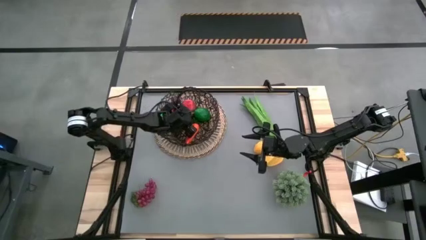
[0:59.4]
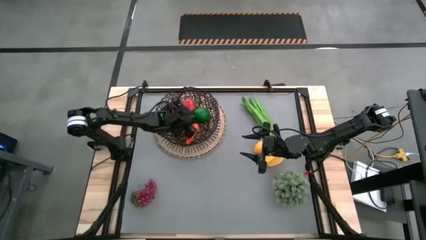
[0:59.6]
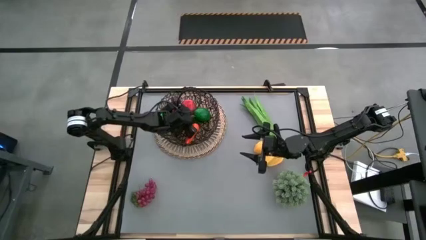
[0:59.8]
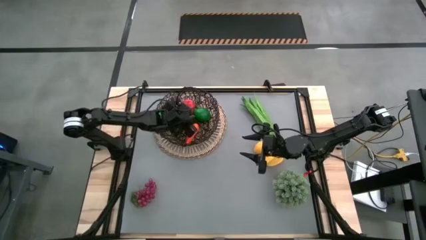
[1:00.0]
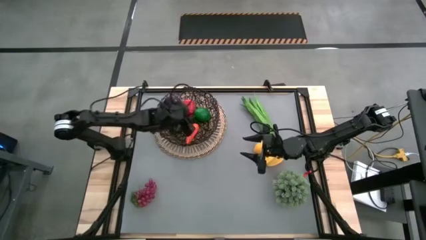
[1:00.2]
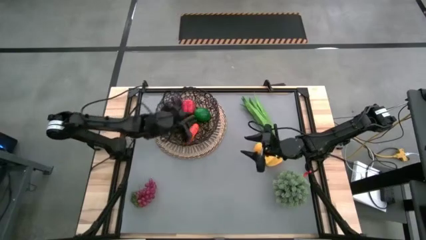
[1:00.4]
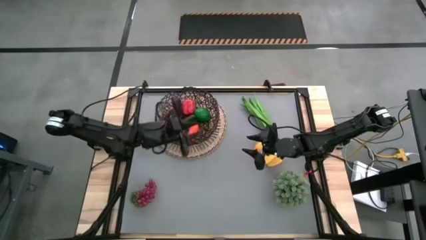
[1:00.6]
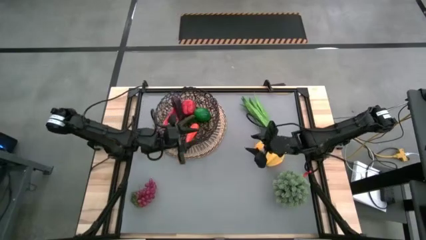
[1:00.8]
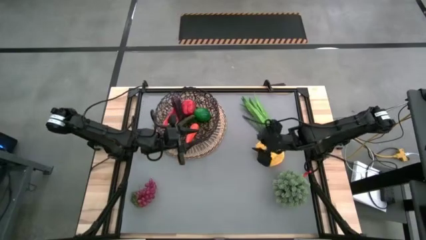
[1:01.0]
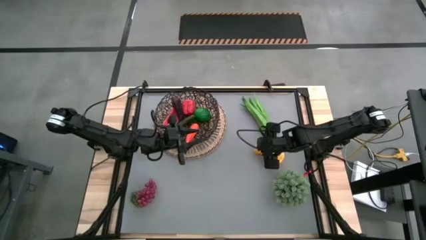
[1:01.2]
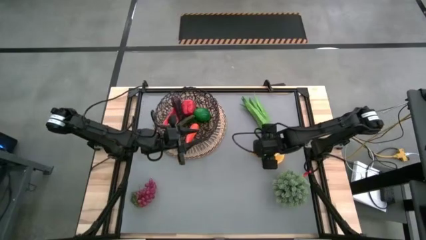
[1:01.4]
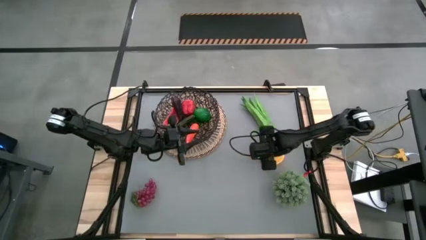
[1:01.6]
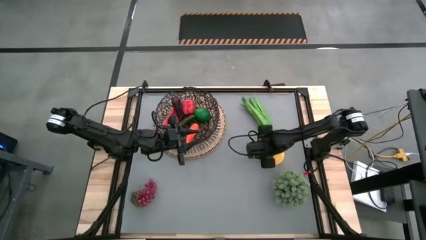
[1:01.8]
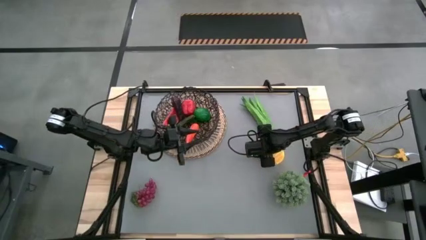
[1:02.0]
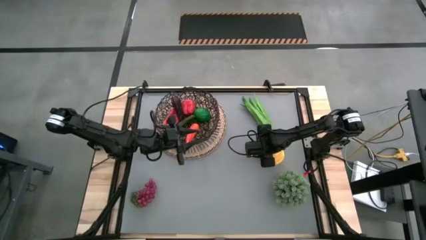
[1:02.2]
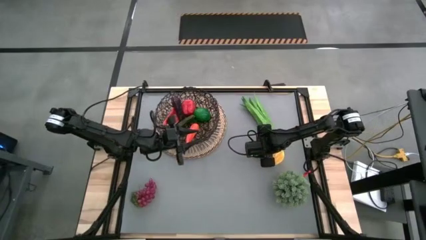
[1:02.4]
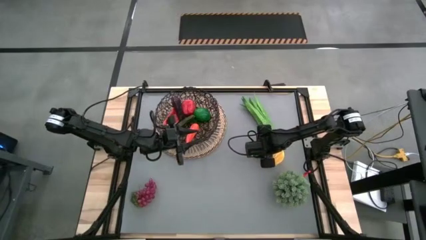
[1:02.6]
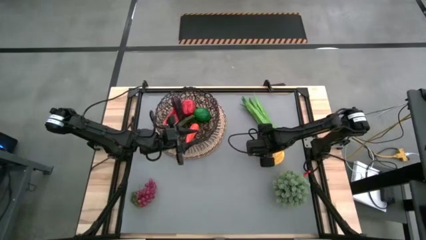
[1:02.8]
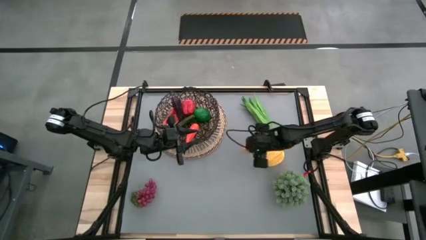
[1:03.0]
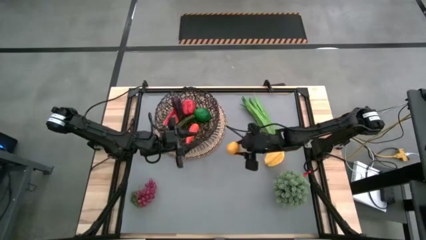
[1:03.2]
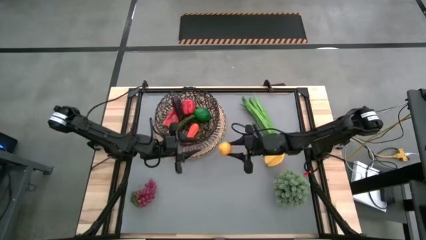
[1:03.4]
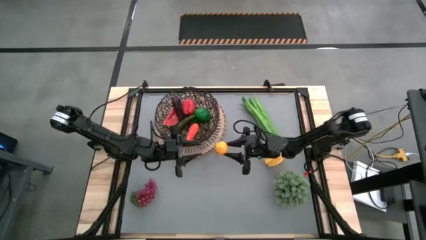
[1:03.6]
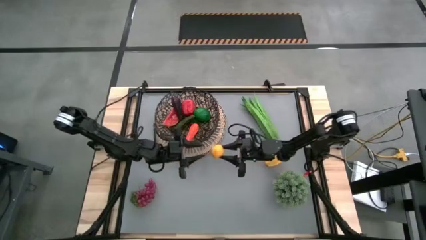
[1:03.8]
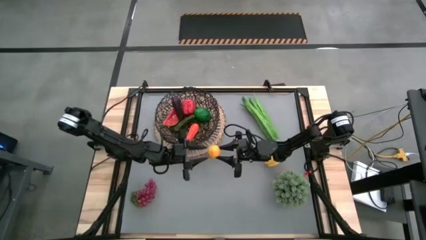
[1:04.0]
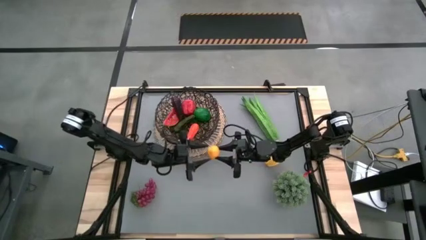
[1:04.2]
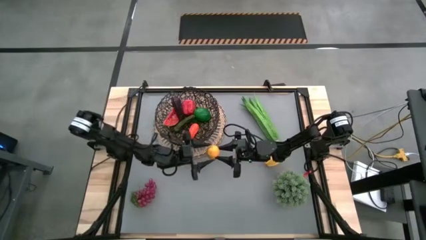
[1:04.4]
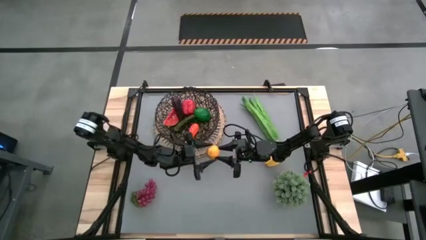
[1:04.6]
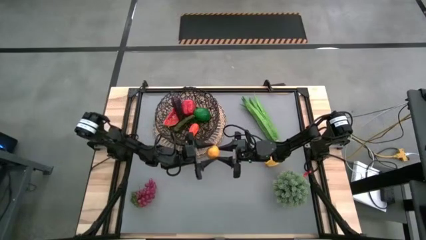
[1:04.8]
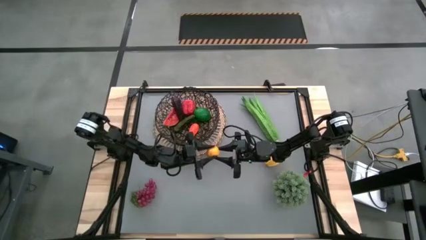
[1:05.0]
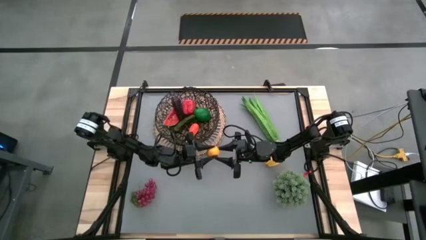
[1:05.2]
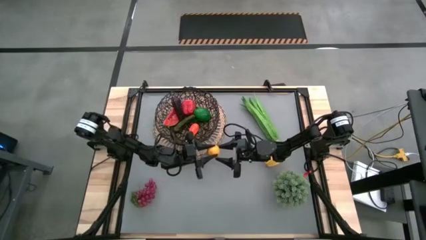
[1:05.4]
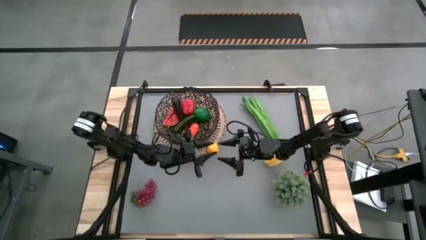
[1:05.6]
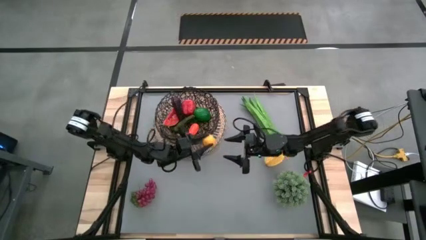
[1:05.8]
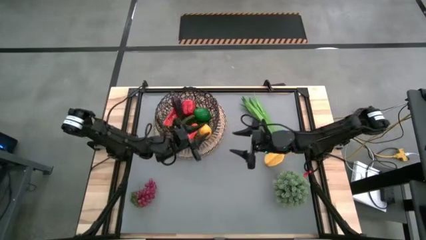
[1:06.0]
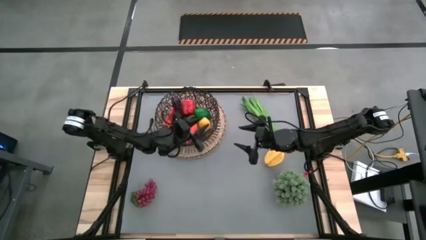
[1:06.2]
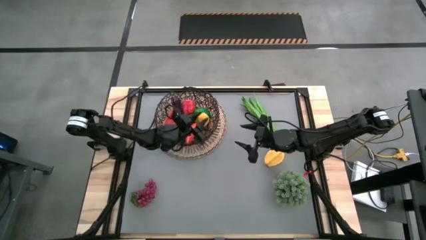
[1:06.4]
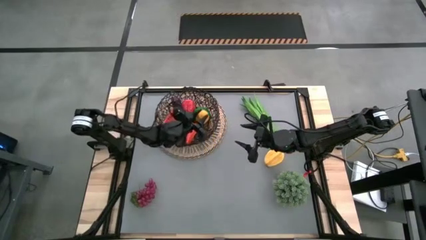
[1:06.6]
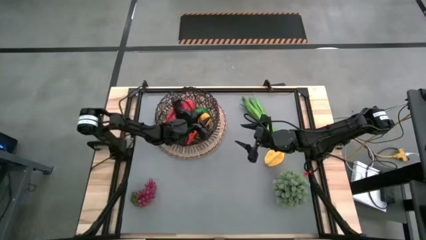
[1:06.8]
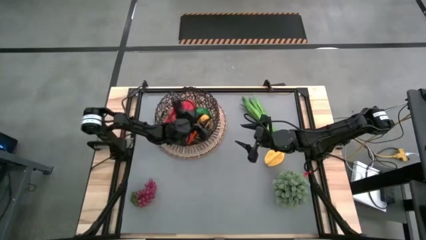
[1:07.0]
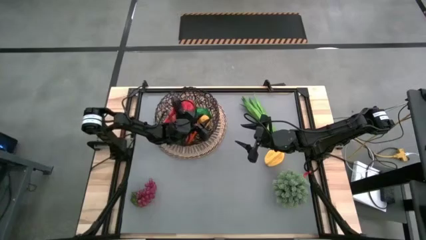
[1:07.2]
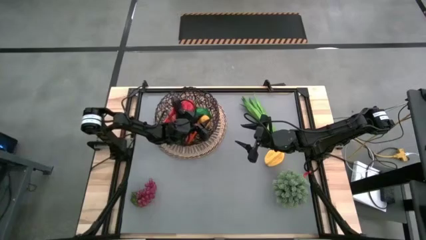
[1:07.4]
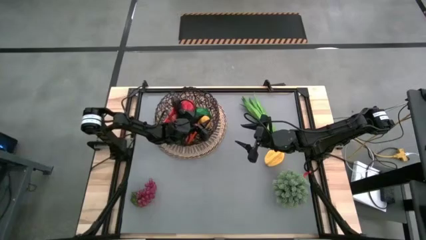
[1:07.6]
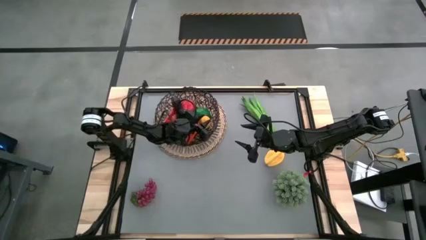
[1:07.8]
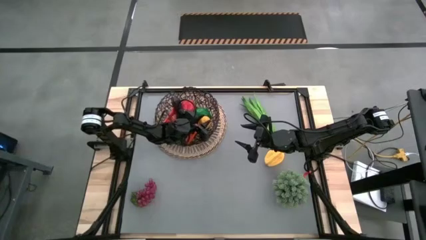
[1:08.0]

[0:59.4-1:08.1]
Task: Build produce basket
Put the yellow lemon into the black wire basket

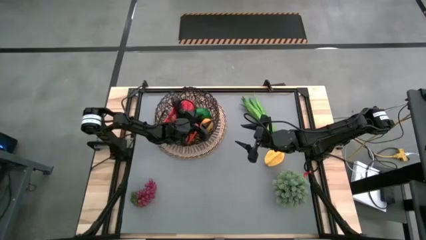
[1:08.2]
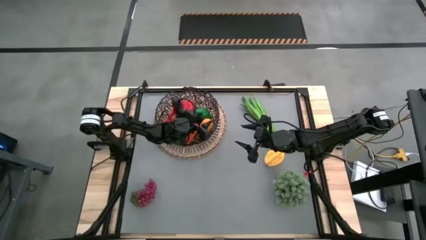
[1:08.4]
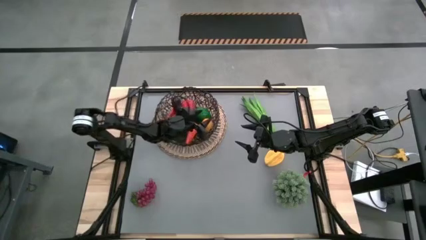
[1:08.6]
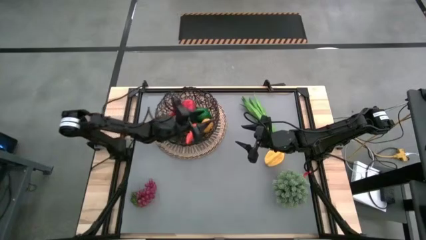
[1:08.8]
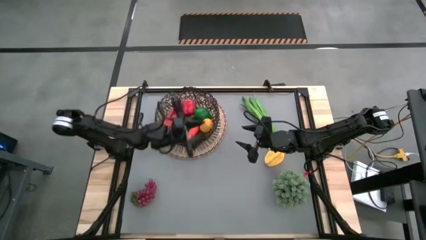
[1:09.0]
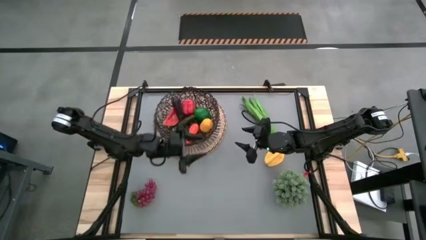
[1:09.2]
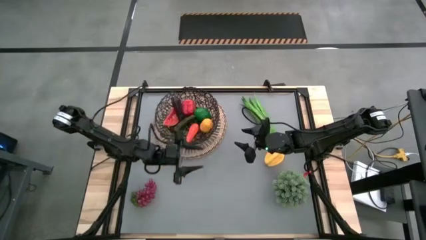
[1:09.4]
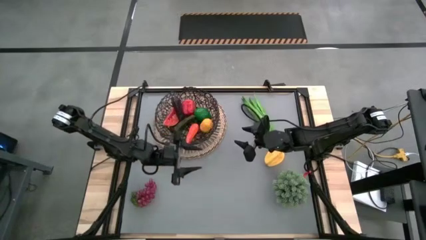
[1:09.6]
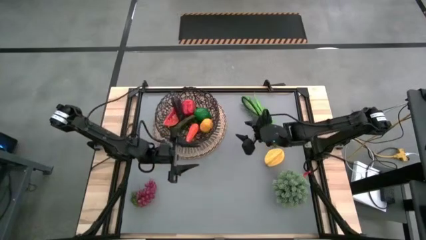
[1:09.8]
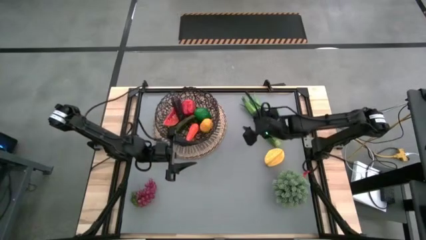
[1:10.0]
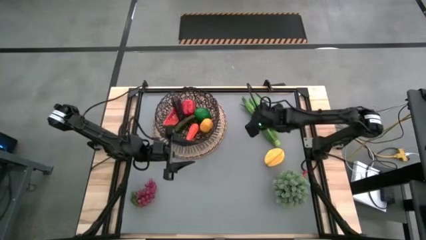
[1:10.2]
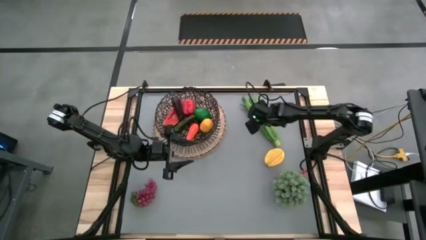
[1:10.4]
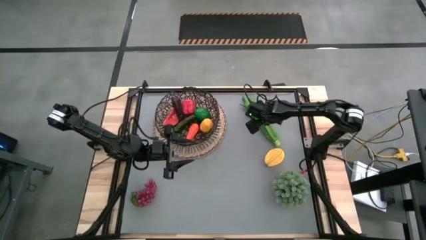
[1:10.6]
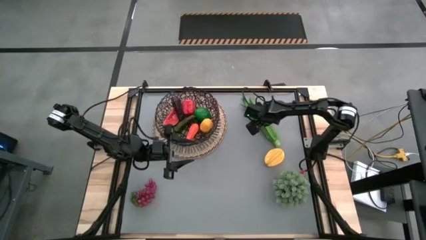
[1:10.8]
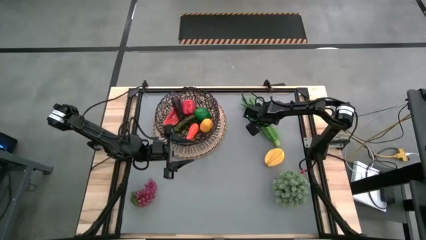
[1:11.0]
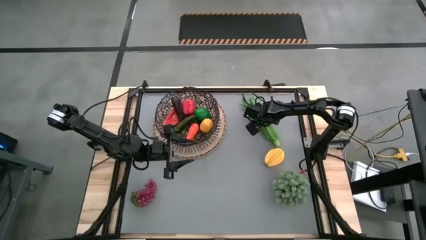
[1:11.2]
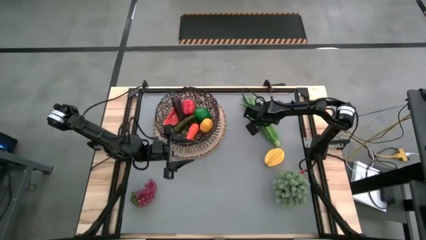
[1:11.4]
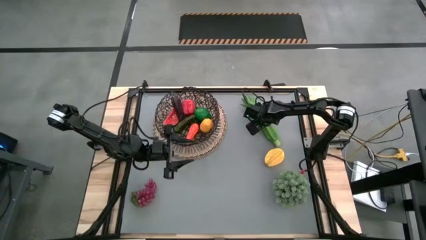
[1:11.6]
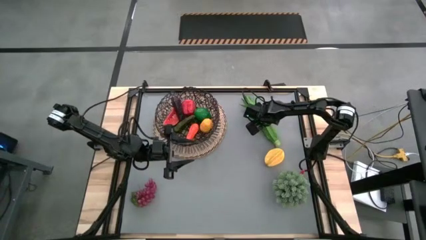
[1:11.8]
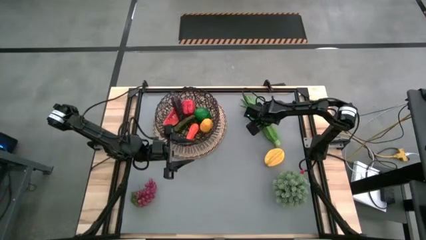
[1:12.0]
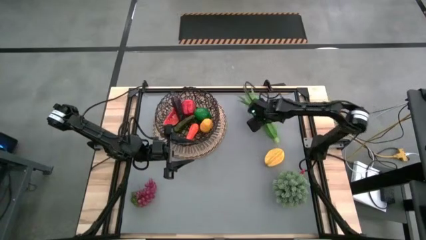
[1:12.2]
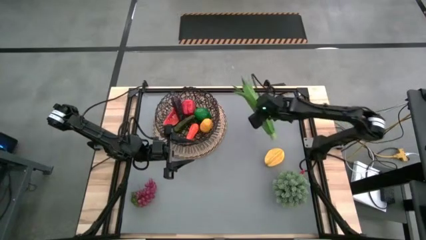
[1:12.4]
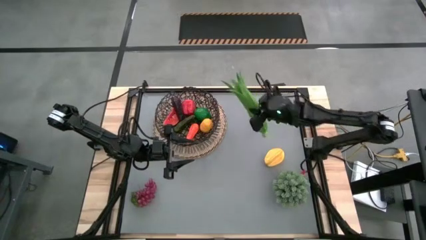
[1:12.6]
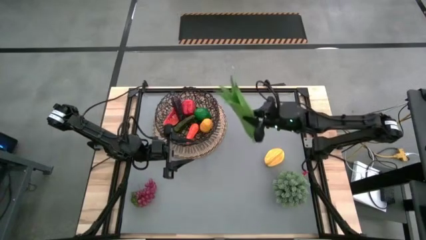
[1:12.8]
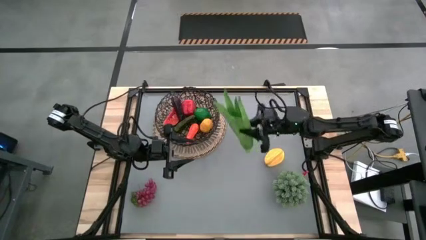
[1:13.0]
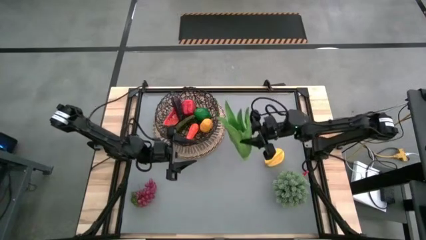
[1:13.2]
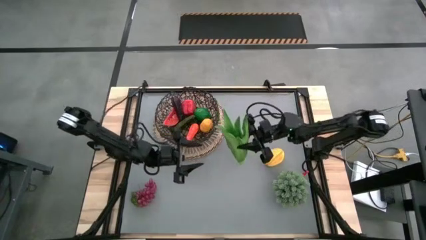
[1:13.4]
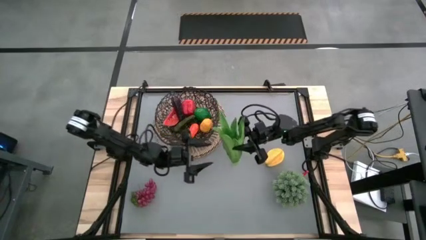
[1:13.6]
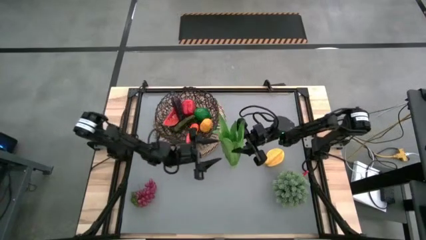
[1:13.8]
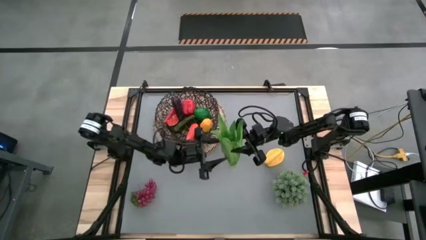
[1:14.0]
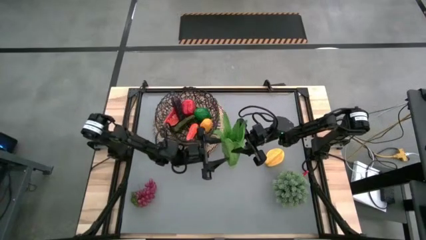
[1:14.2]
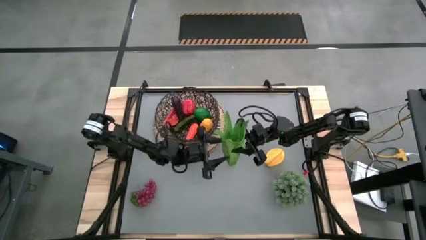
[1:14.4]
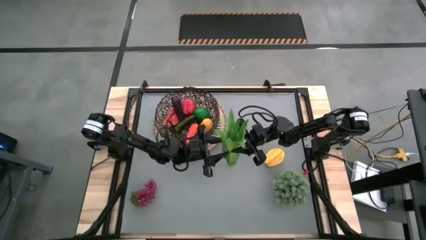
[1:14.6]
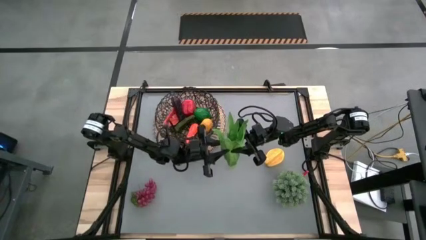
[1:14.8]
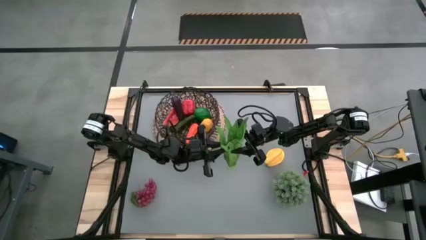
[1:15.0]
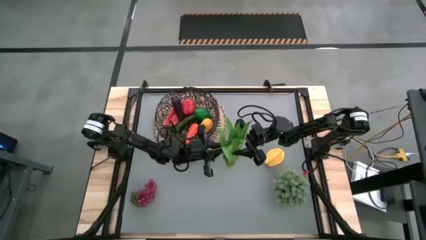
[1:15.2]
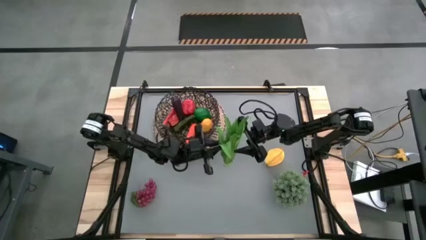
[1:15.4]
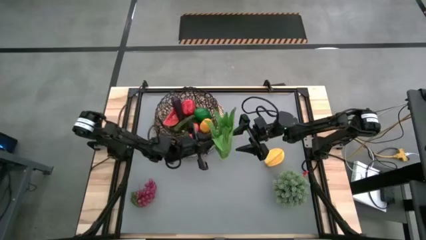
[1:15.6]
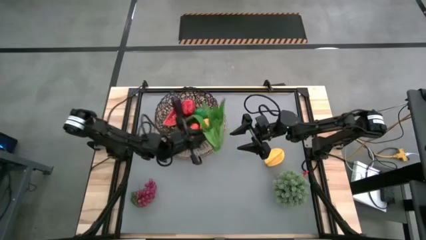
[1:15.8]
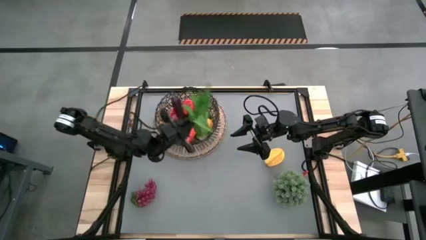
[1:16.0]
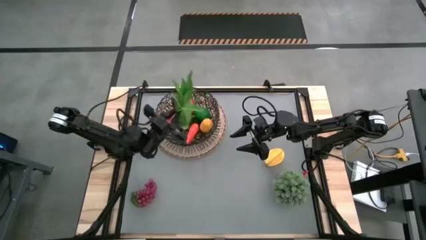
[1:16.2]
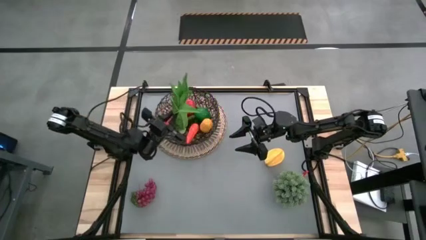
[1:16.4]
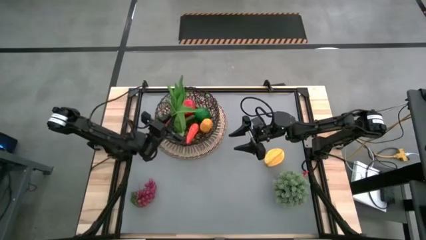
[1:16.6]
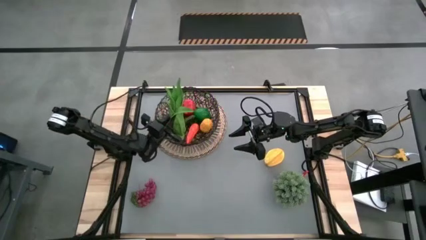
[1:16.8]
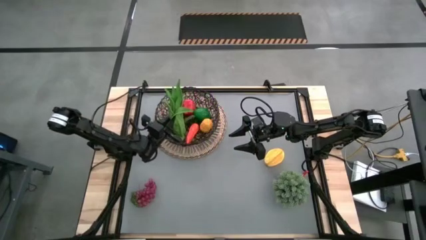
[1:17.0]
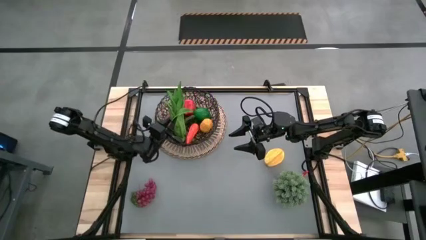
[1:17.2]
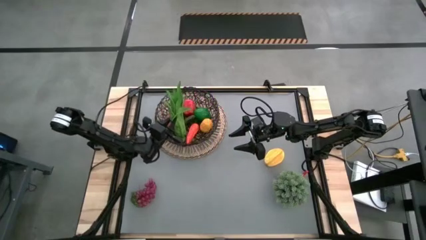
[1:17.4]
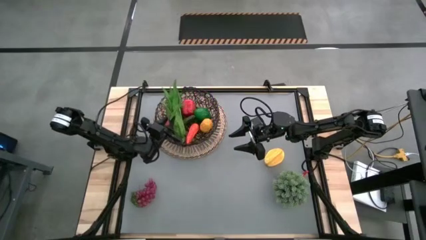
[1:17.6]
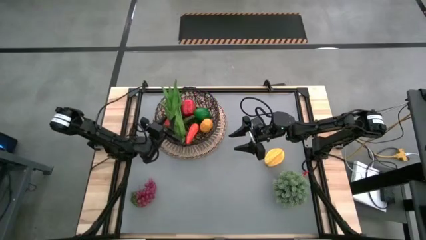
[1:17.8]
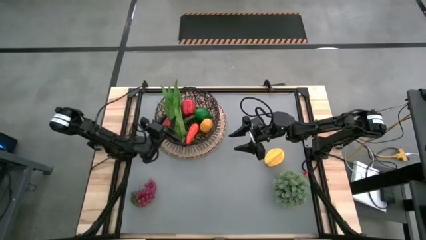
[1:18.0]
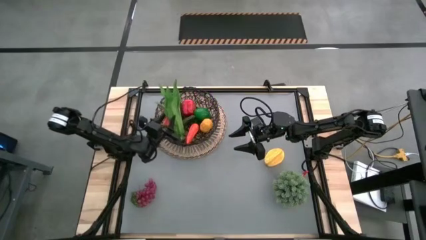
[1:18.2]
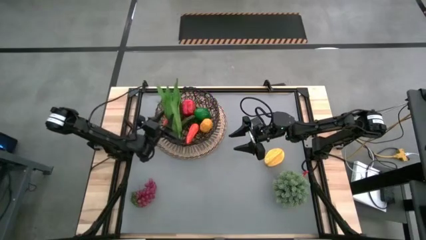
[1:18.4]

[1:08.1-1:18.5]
Put the green leaf lettuce into the black wire basket
